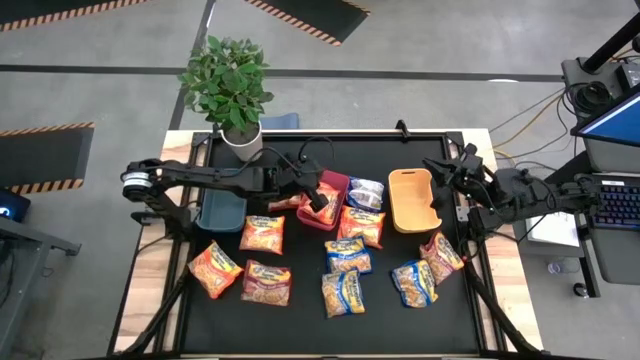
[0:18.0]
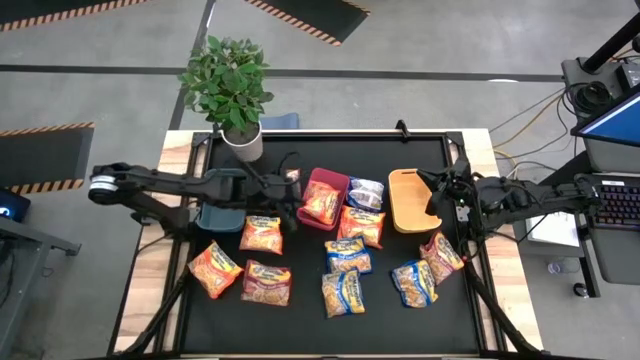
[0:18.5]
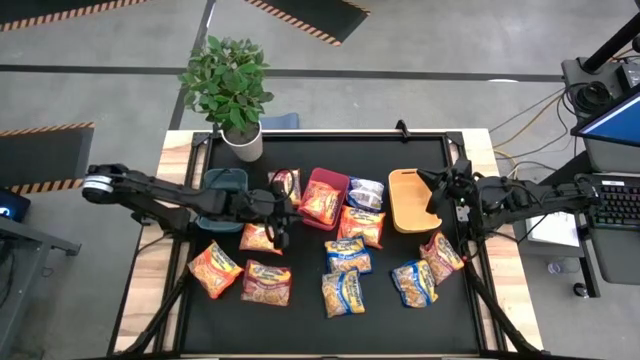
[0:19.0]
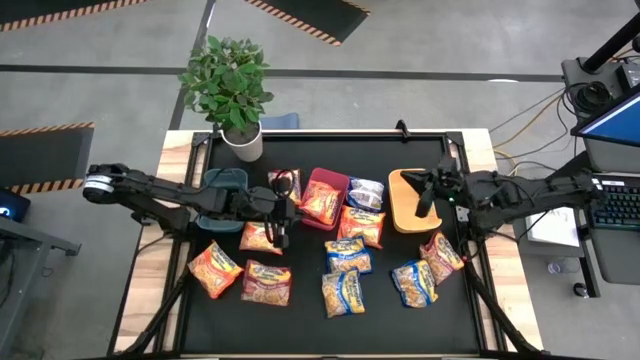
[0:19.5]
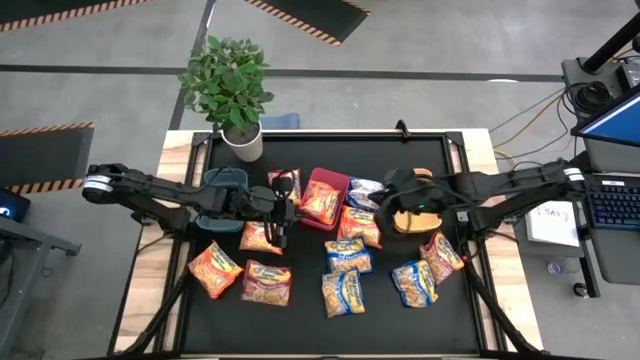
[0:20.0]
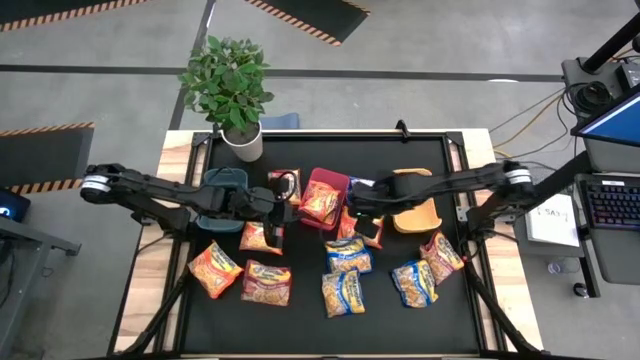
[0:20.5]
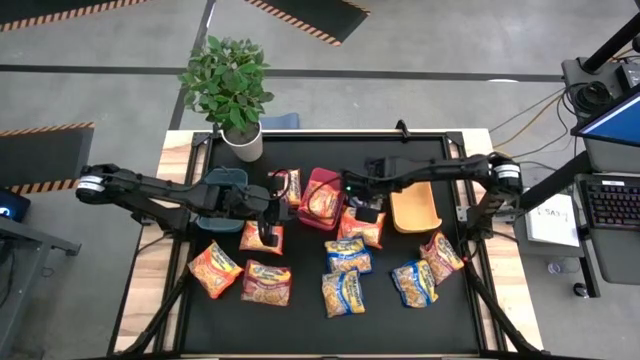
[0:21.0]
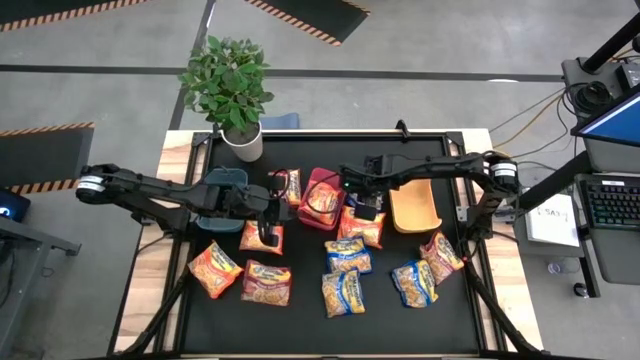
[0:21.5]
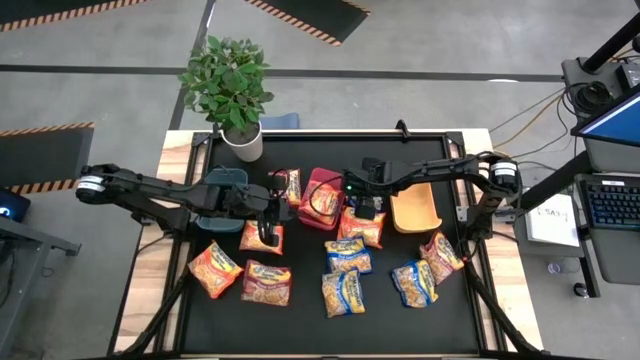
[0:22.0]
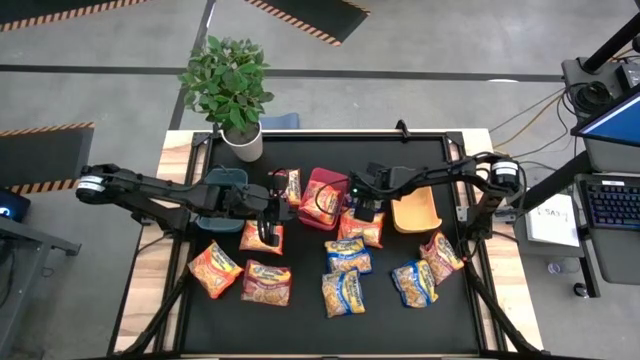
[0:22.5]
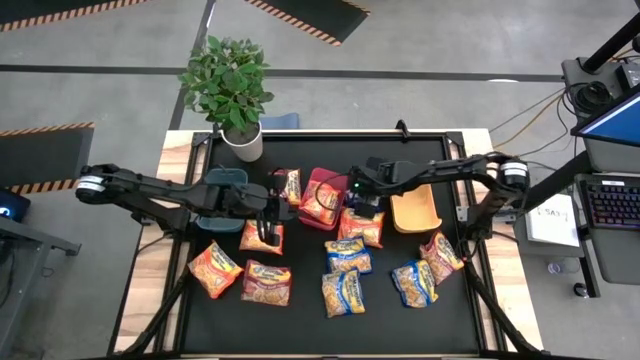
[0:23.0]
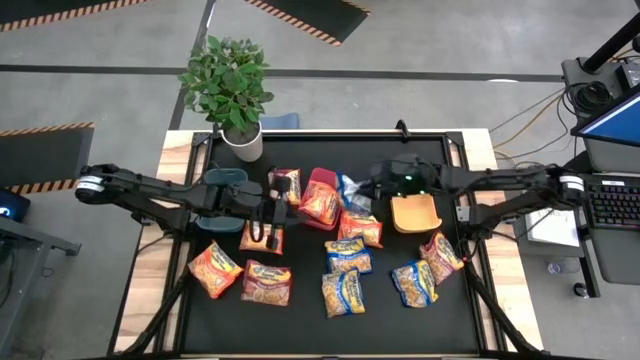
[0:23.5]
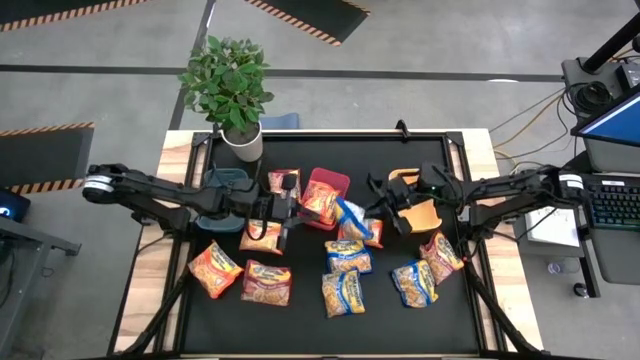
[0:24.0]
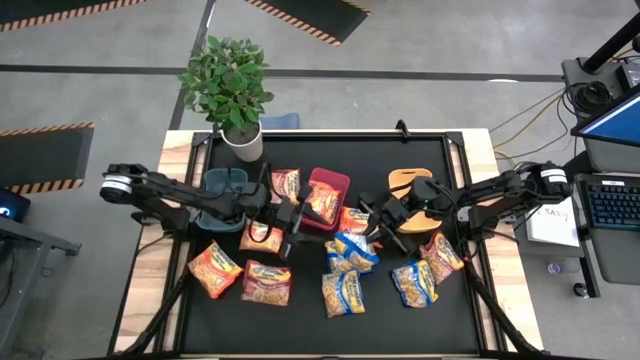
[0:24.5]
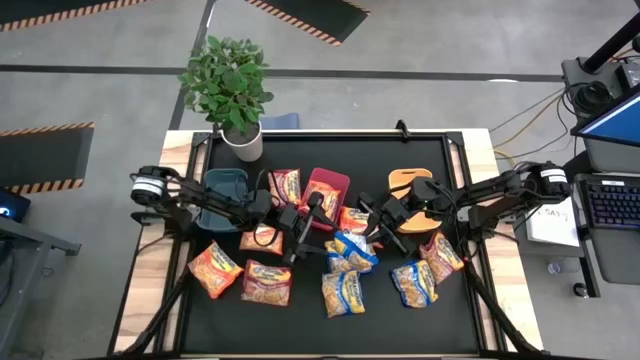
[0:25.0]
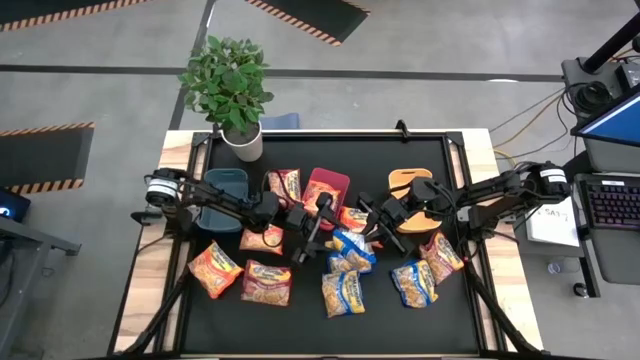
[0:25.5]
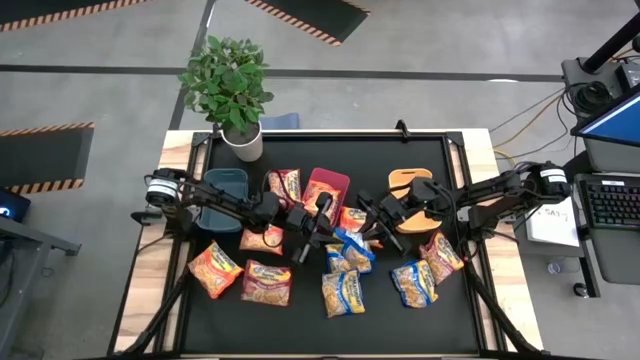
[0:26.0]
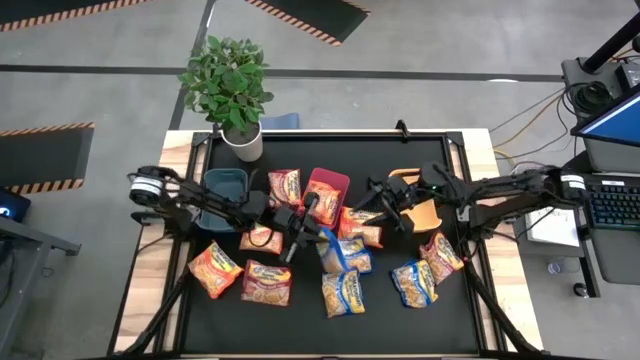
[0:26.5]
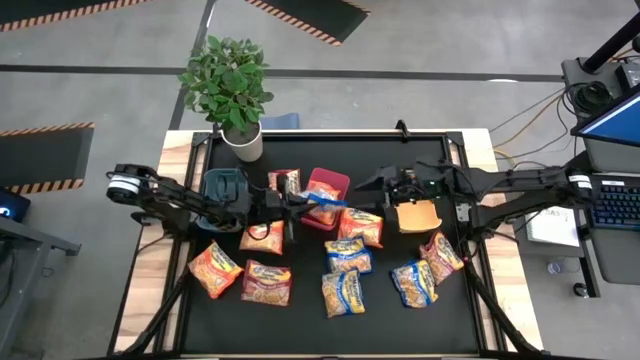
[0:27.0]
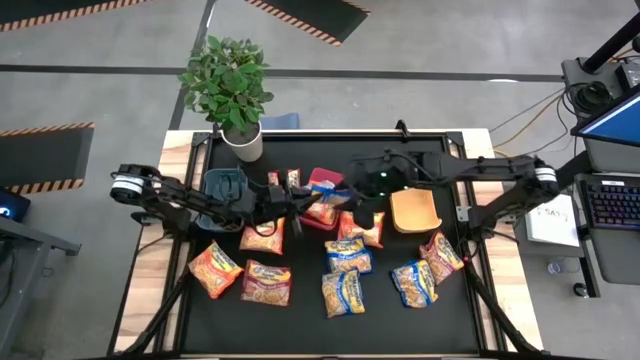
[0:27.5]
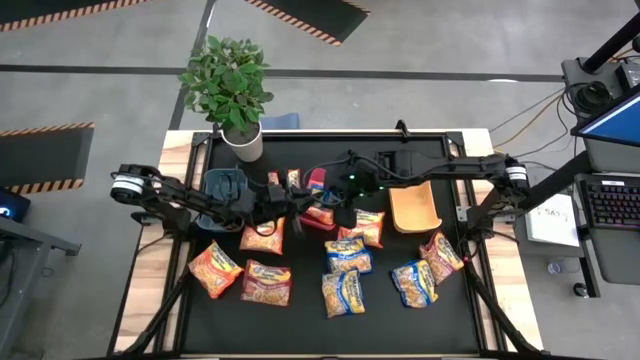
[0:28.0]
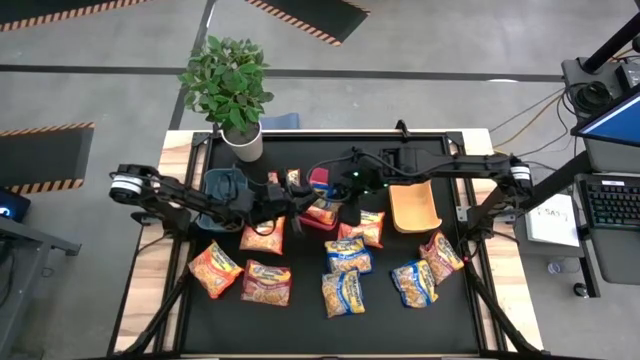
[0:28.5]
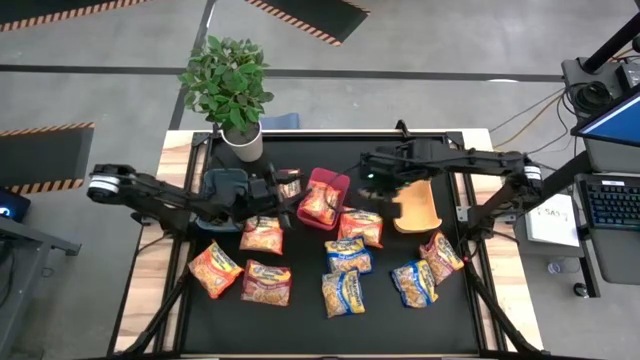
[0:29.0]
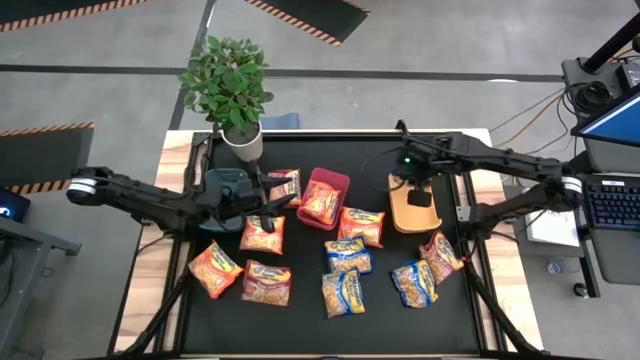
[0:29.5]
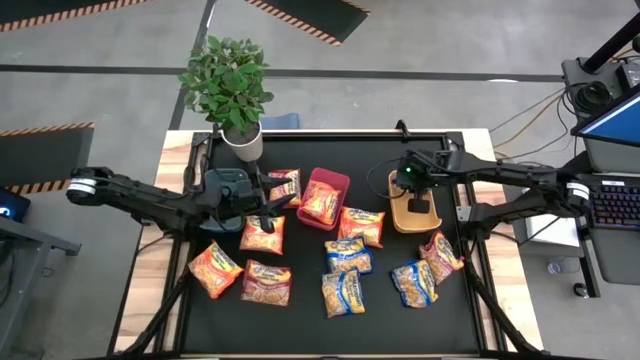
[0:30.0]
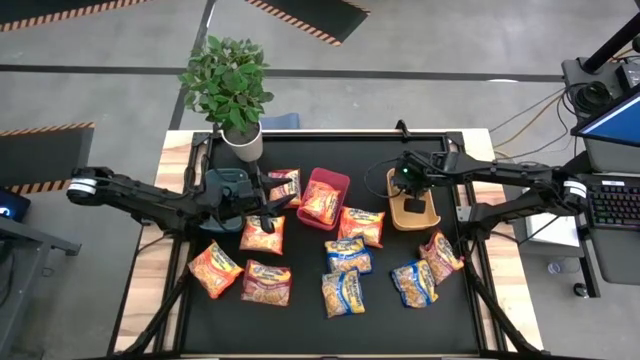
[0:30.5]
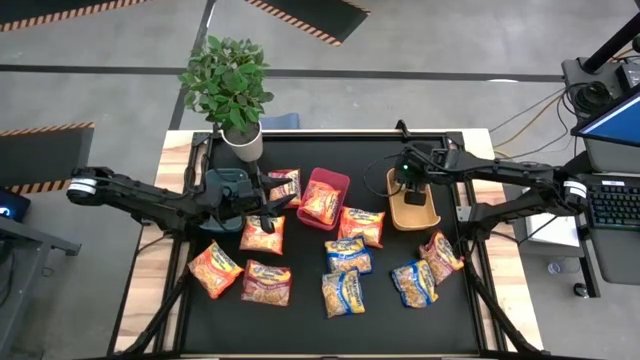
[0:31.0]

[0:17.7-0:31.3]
Task: Sort Maruchan noodles
Put the blue noodle pack into the yellow bin
